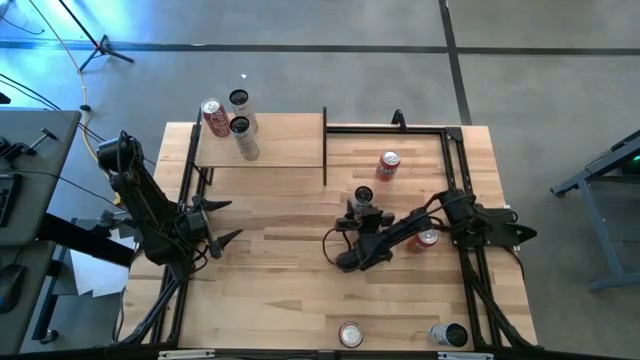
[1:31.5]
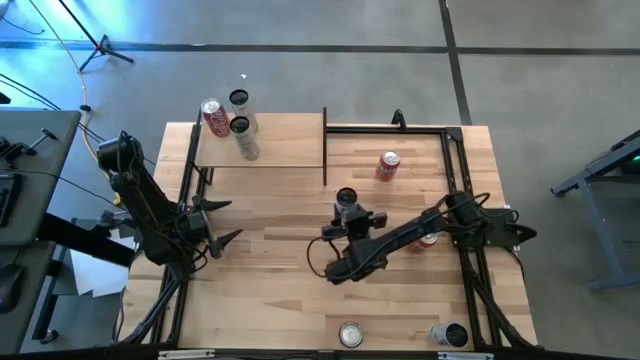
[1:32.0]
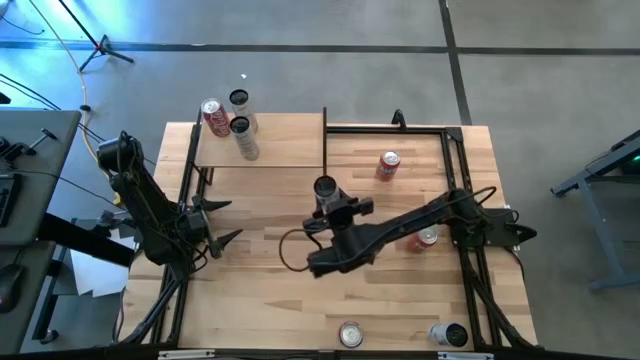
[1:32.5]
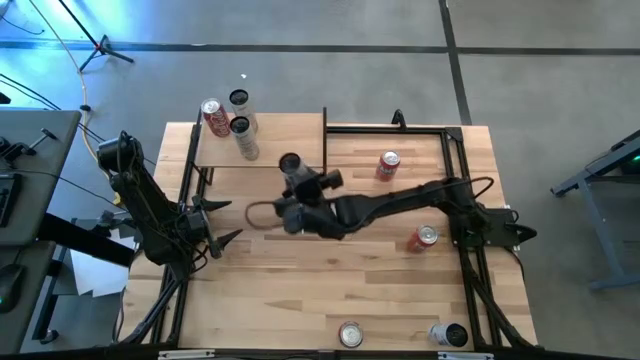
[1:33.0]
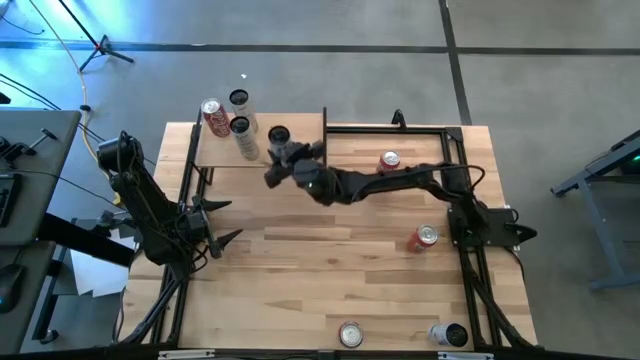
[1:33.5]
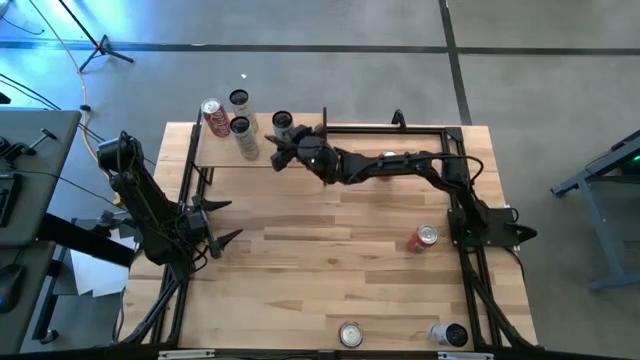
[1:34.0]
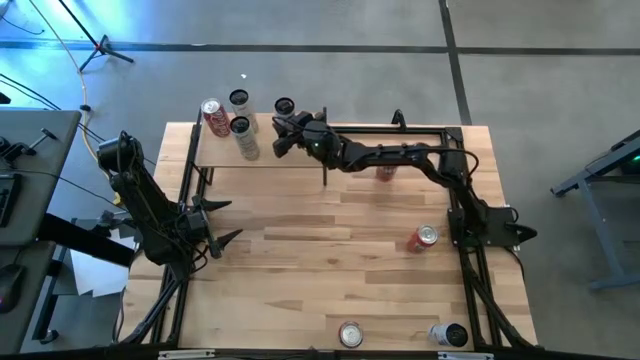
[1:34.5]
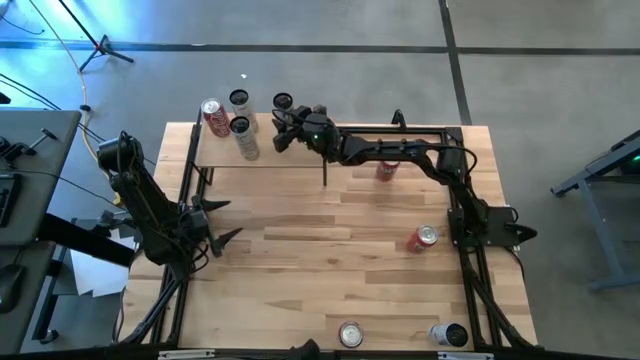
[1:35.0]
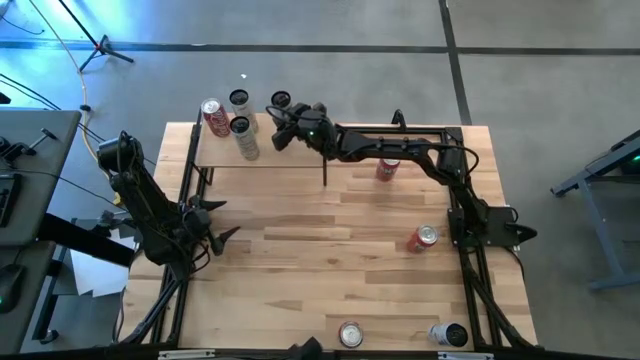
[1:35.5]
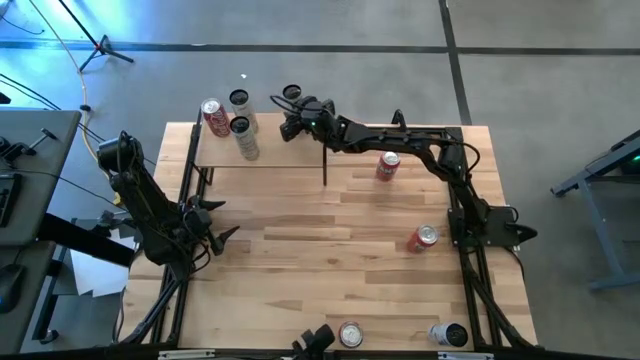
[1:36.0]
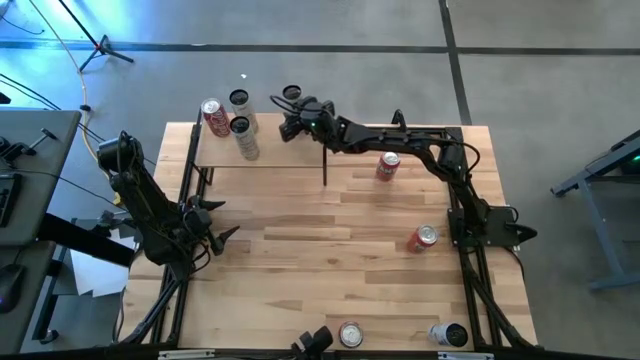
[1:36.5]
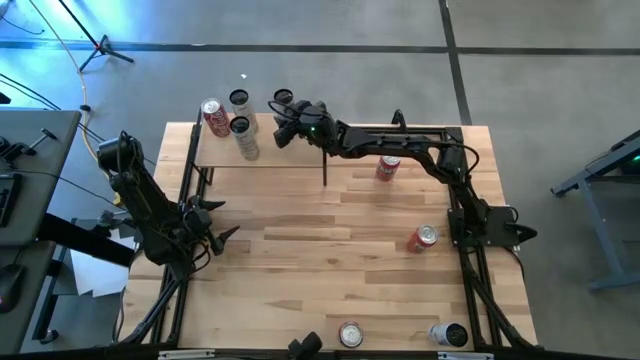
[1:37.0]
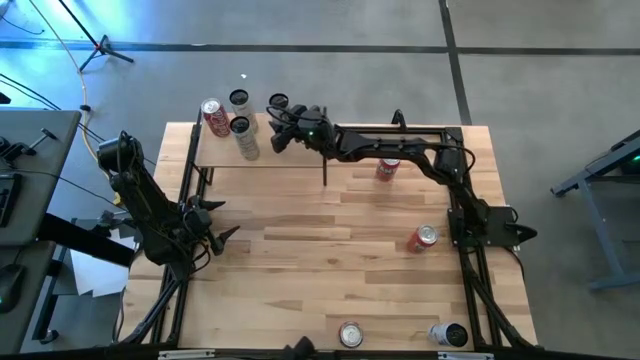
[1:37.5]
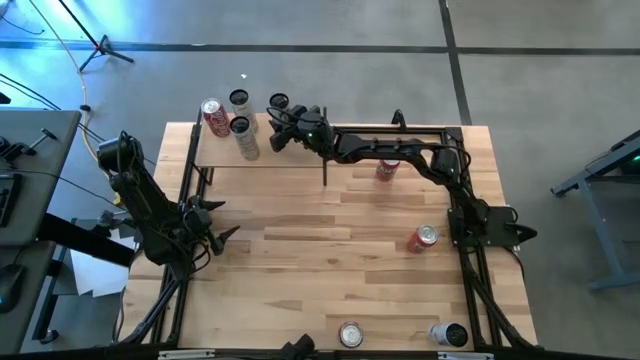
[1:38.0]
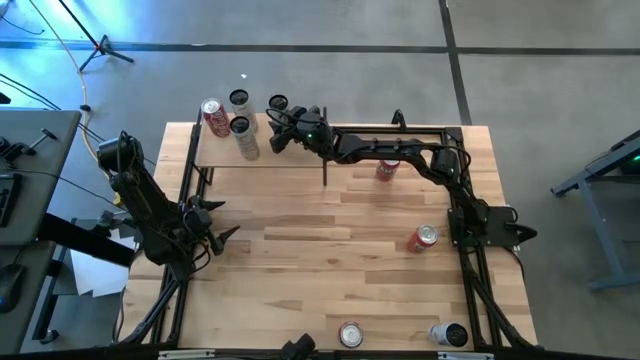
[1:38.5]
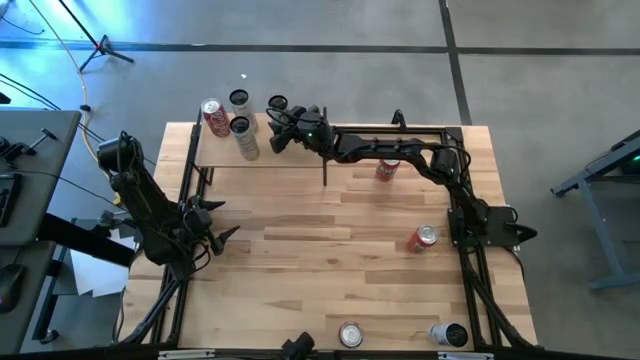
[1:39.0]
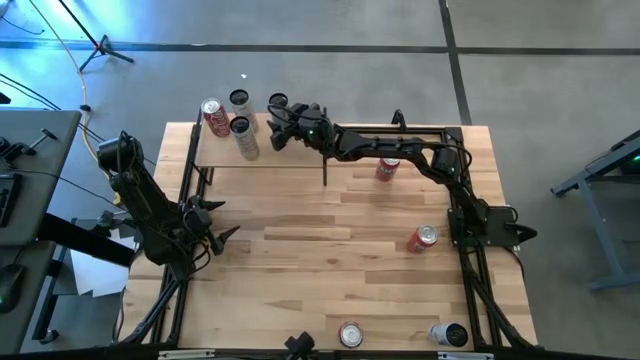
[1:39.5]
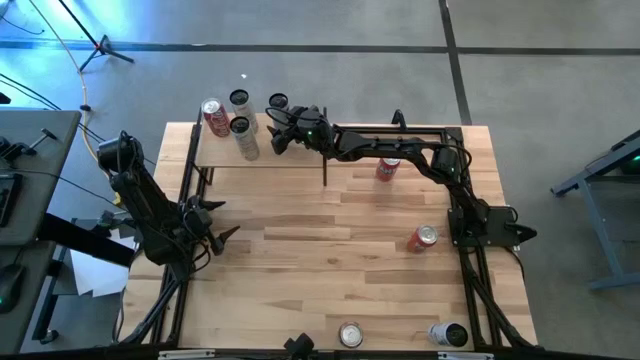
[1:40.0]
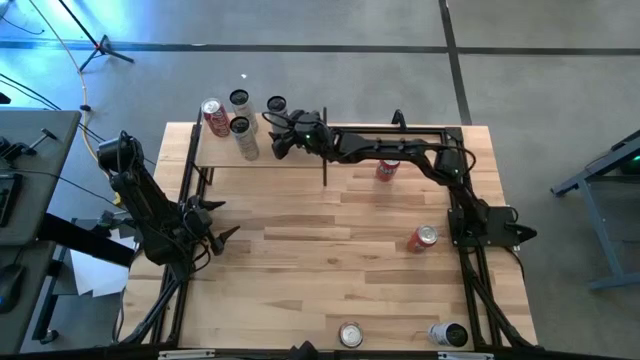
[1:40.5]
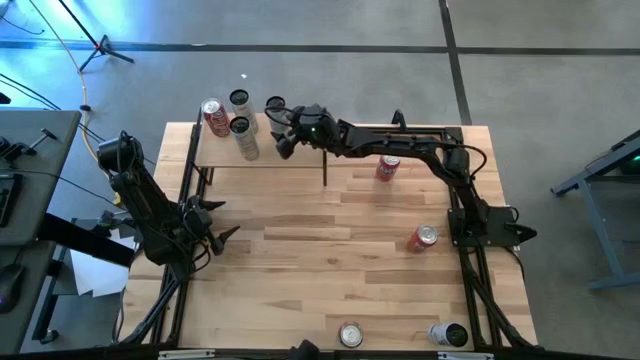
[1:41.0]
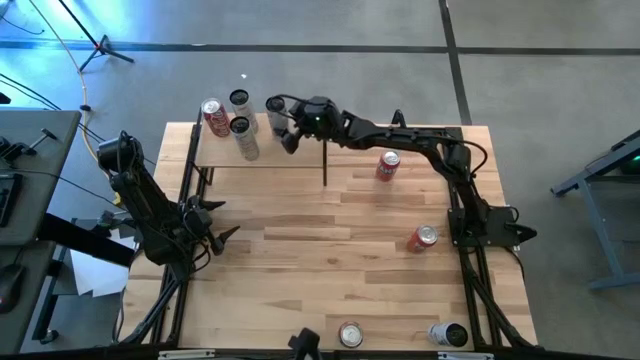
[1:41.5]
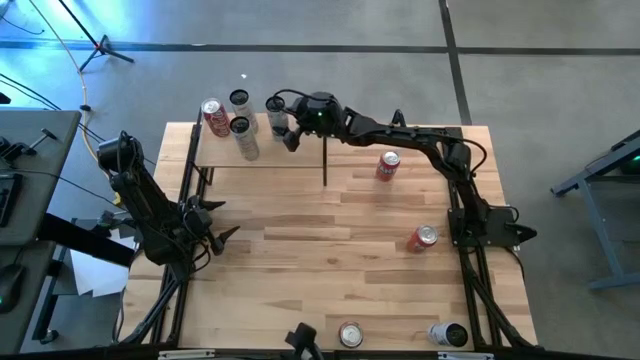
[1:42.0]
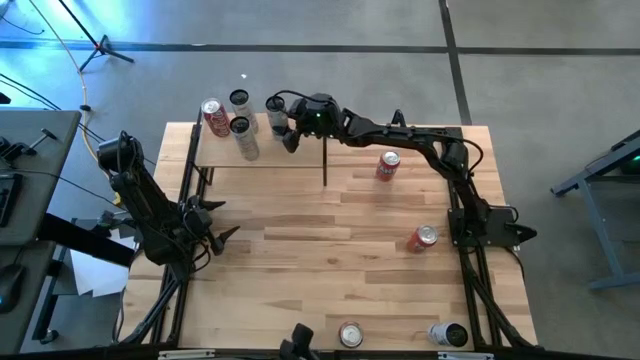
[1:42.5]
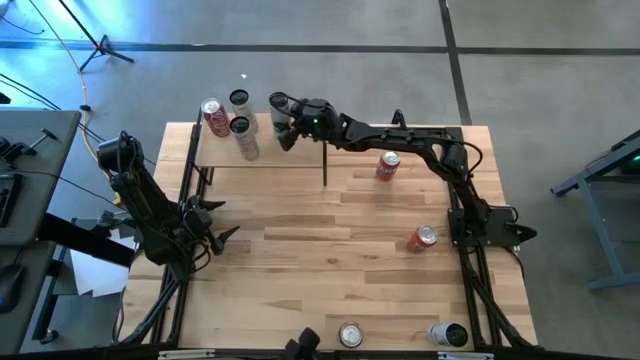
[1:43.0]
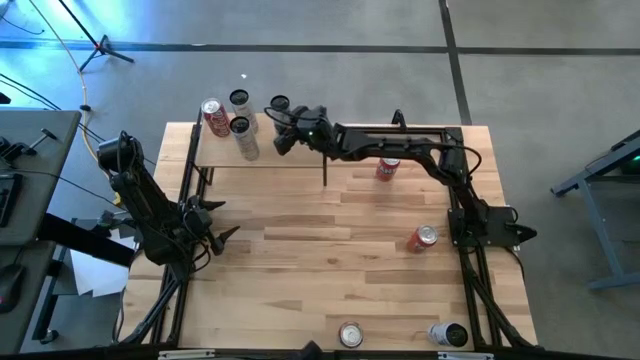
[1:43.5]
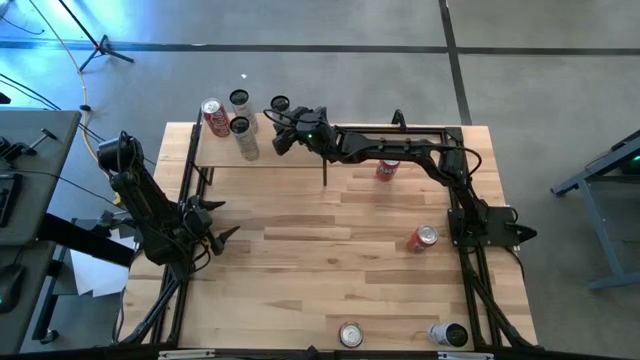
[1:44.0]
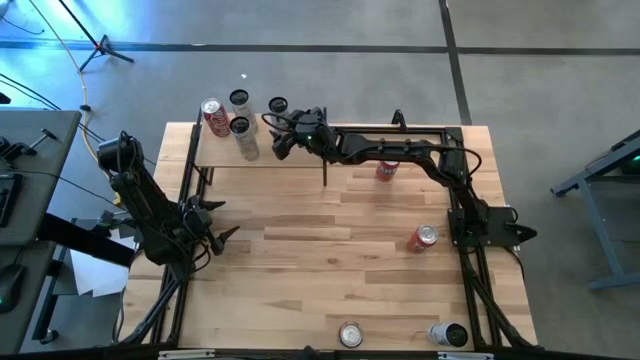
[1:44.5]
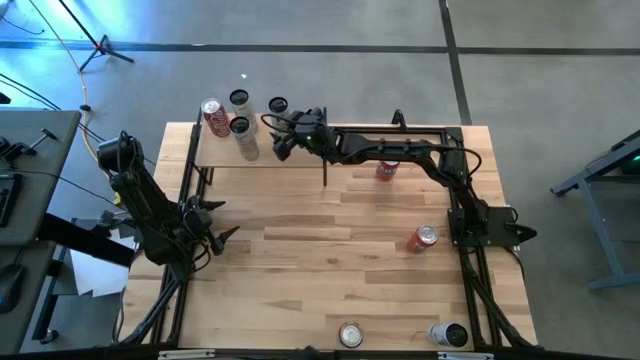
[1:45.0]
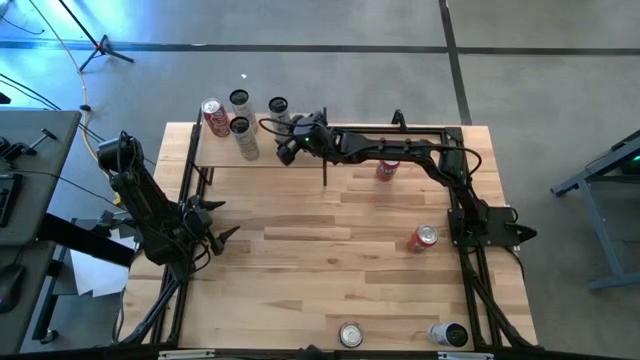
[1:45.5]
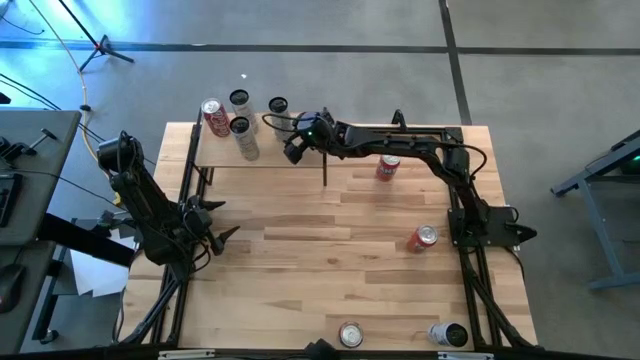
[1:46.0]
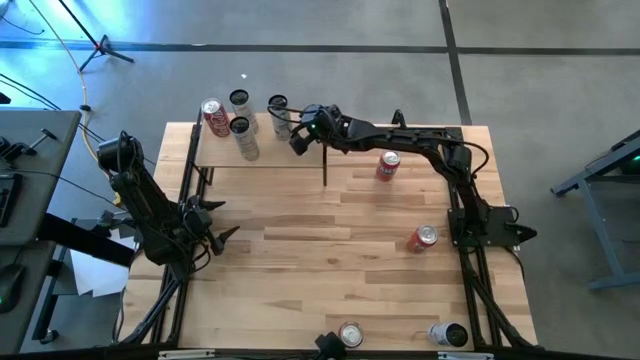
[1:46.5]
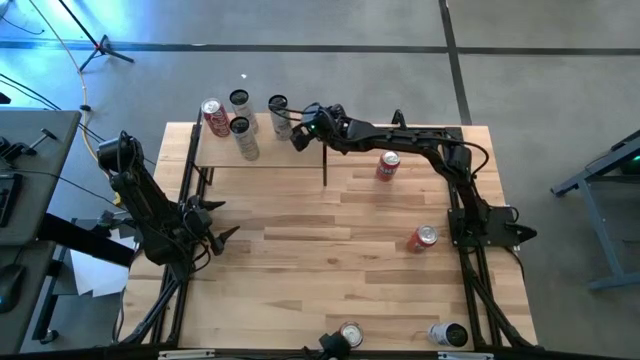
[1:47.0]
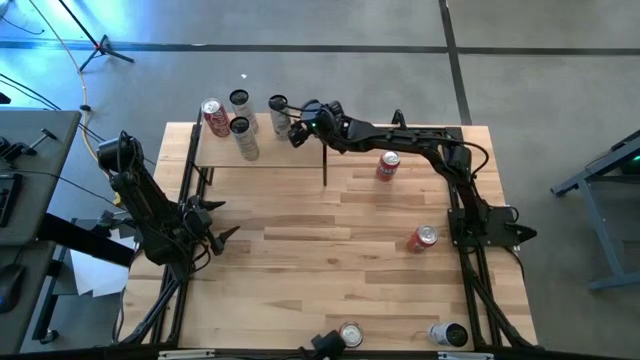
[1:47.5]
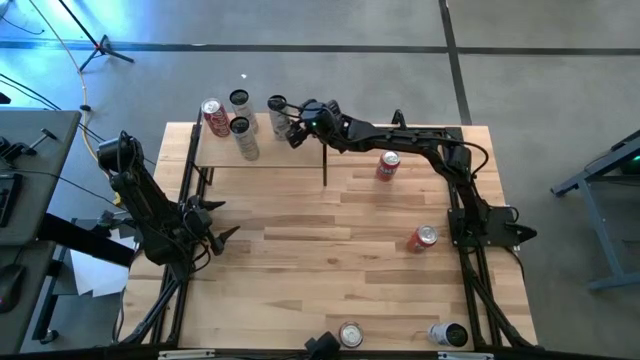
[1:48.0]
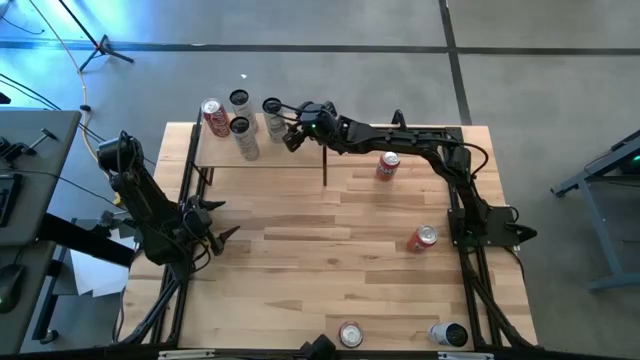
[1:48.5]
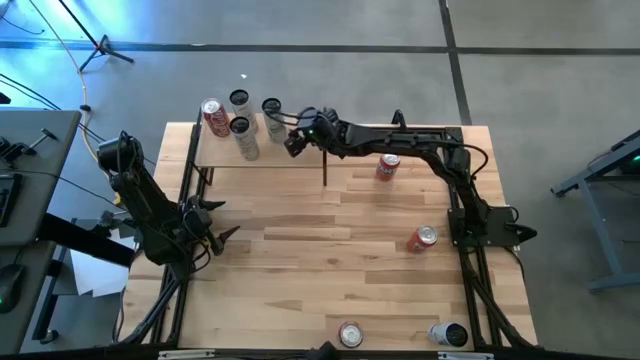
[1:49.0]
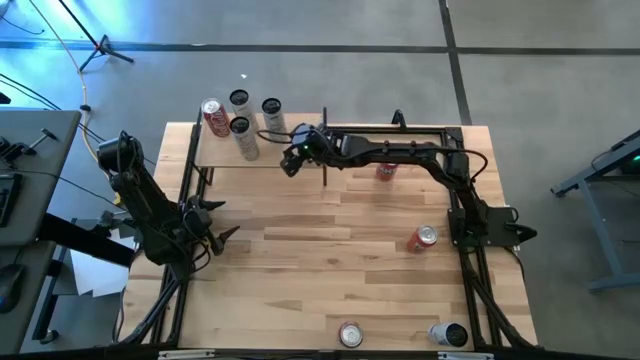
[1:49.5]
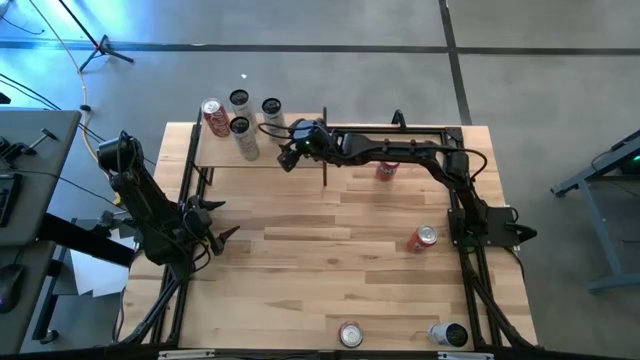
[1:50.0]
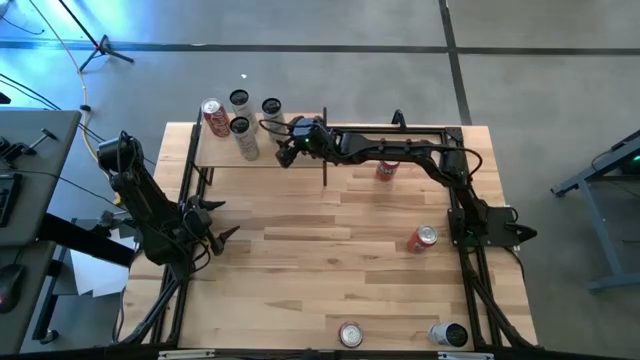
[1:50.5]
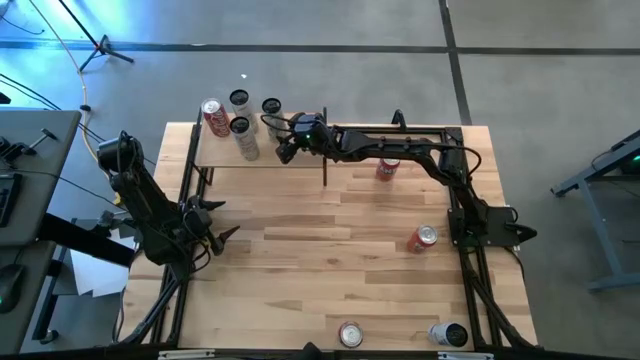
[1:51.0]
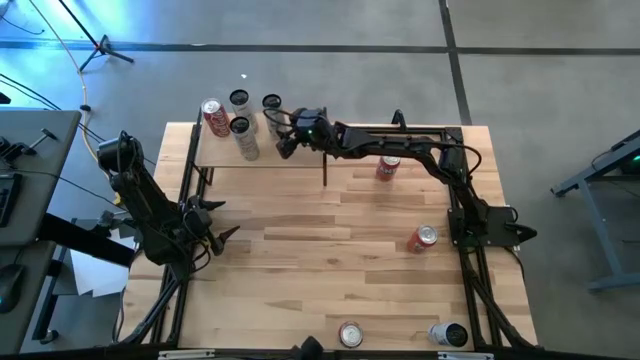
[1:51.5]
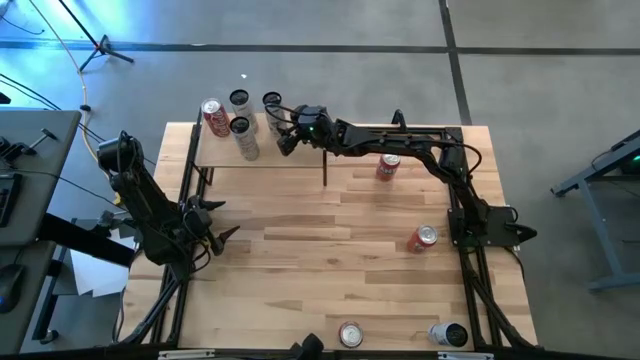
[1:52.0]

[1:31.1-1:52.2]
Task: Place canned beverage on shelf
Put the top blue soda can on the shelf
